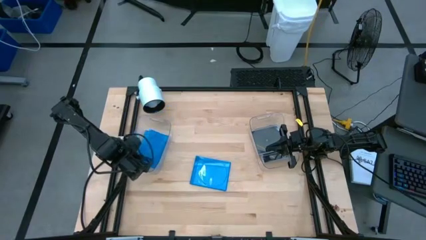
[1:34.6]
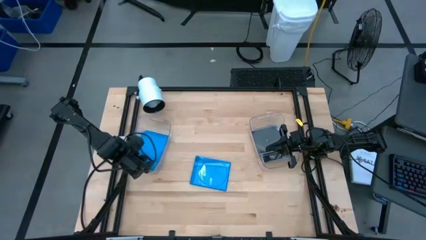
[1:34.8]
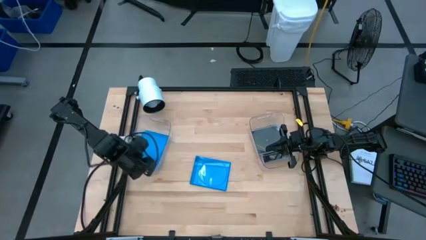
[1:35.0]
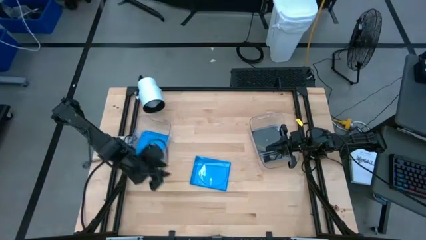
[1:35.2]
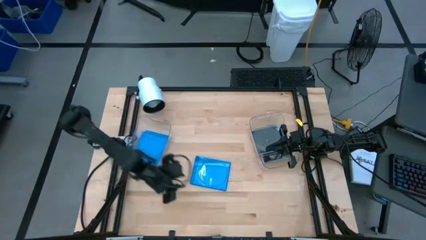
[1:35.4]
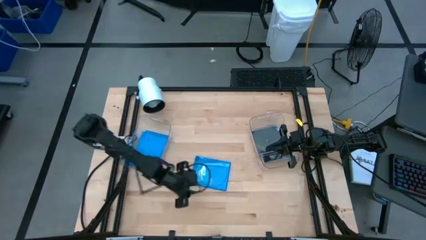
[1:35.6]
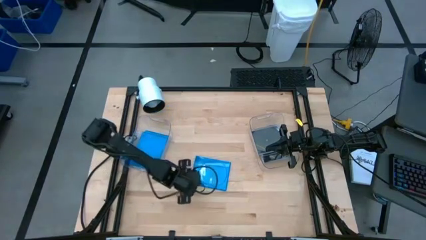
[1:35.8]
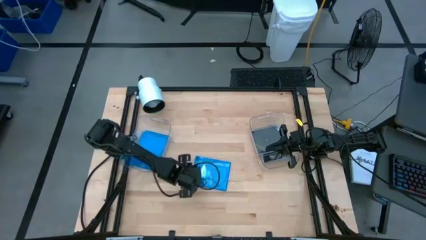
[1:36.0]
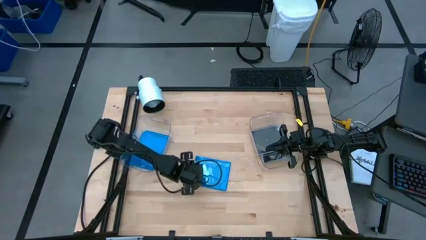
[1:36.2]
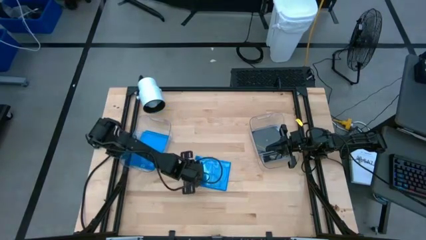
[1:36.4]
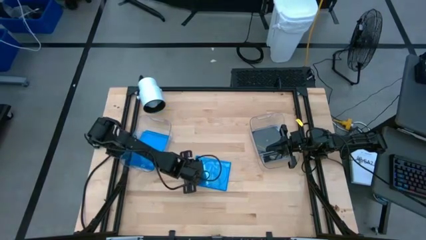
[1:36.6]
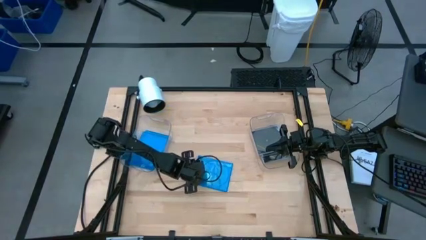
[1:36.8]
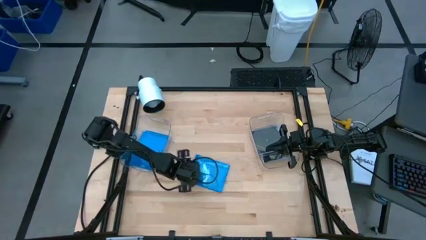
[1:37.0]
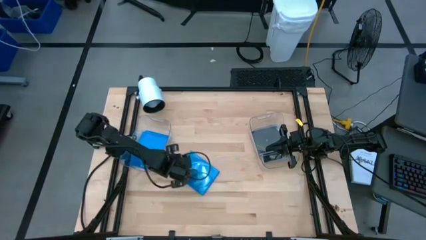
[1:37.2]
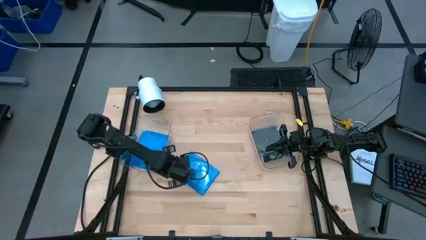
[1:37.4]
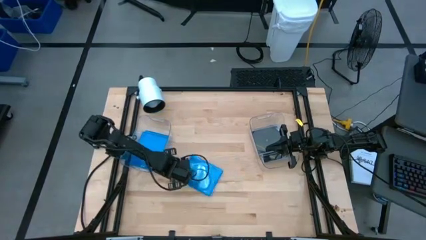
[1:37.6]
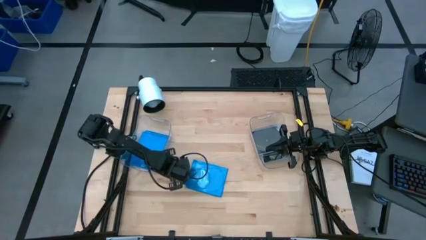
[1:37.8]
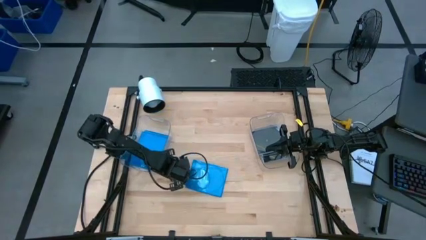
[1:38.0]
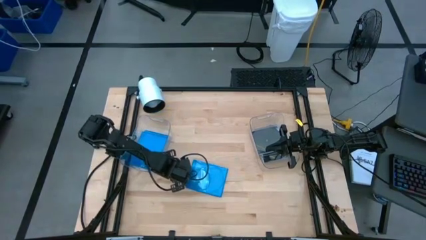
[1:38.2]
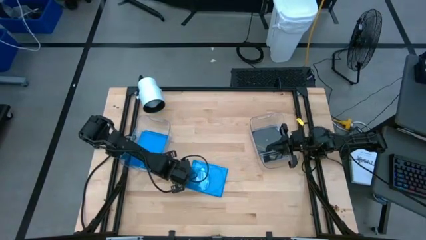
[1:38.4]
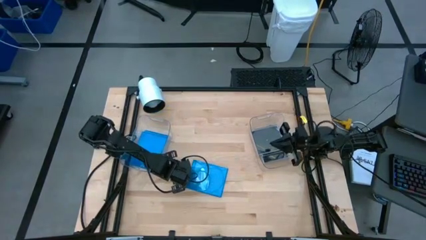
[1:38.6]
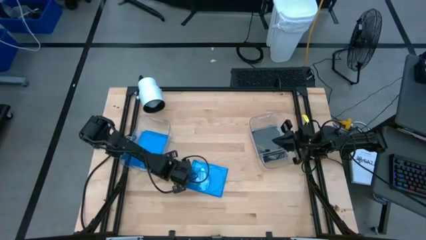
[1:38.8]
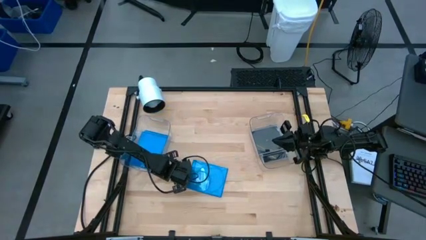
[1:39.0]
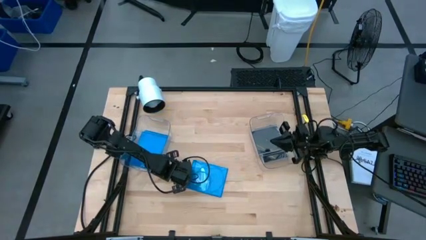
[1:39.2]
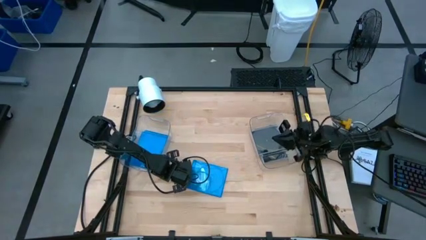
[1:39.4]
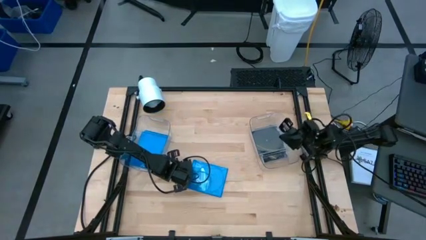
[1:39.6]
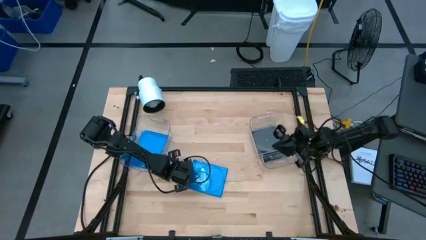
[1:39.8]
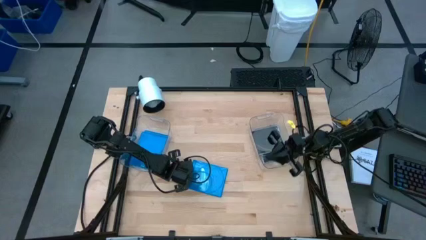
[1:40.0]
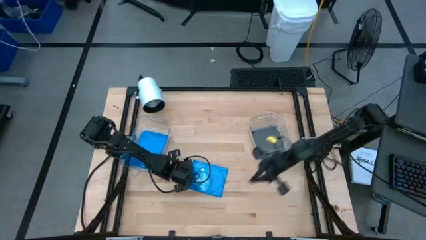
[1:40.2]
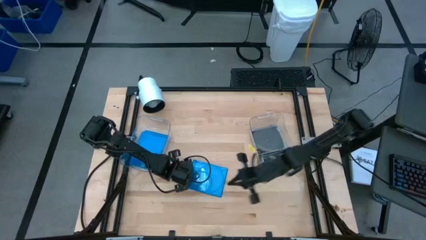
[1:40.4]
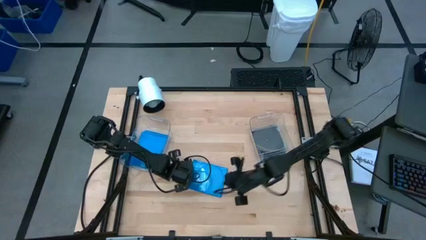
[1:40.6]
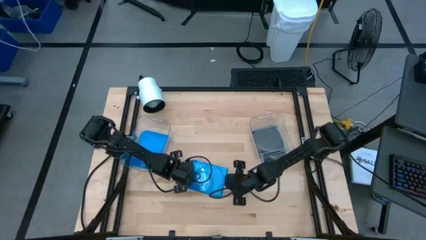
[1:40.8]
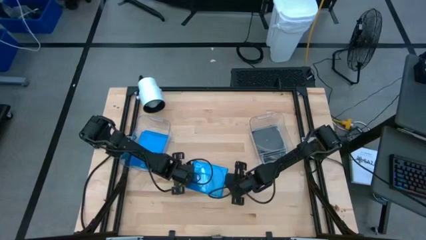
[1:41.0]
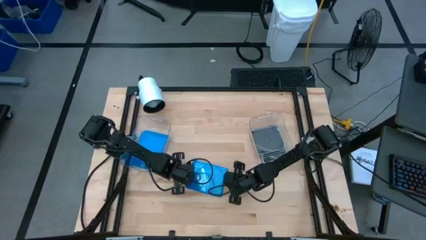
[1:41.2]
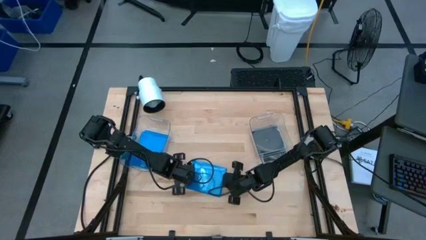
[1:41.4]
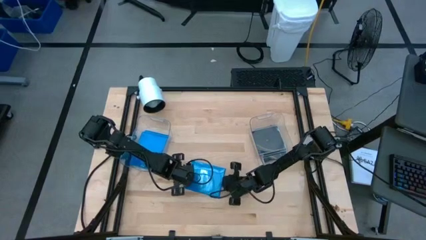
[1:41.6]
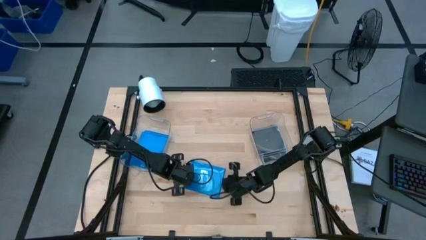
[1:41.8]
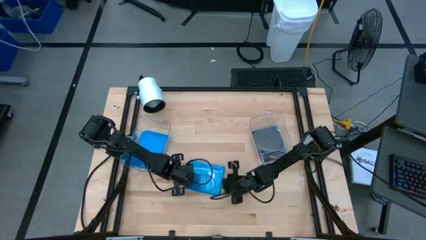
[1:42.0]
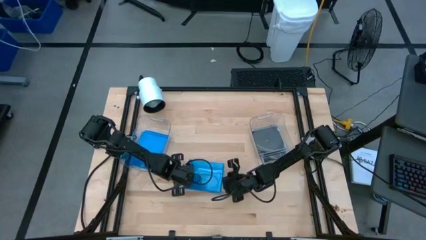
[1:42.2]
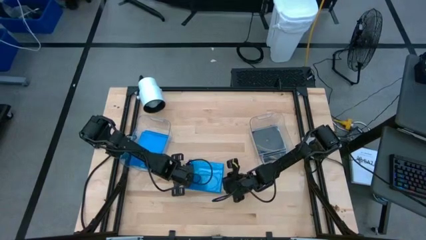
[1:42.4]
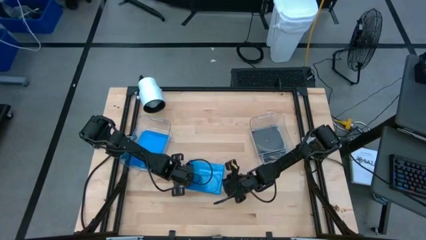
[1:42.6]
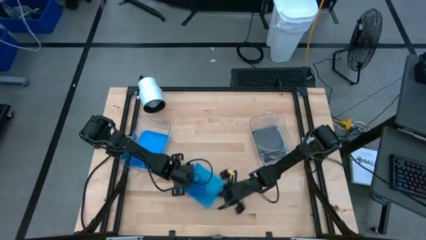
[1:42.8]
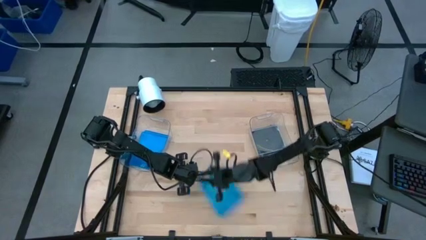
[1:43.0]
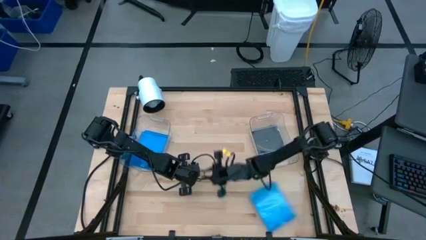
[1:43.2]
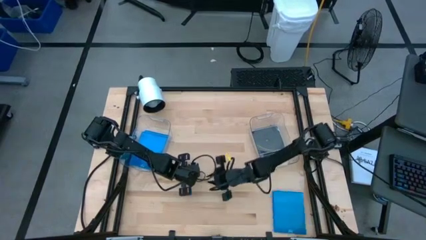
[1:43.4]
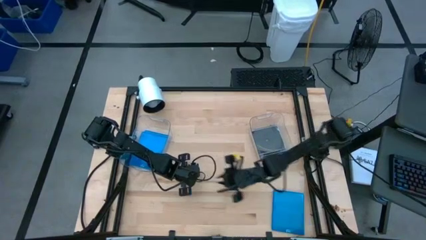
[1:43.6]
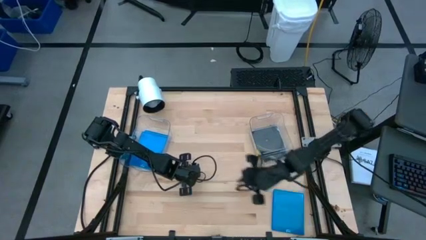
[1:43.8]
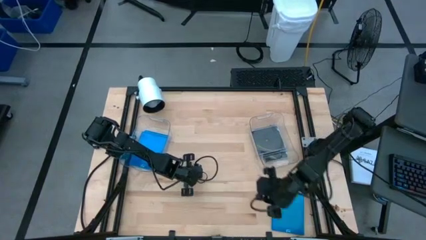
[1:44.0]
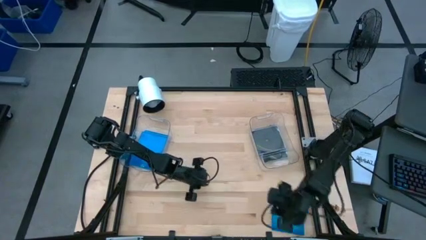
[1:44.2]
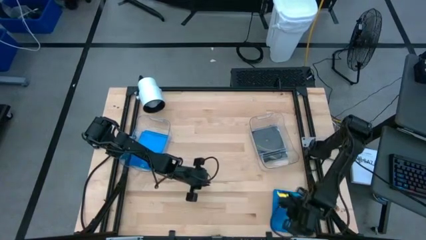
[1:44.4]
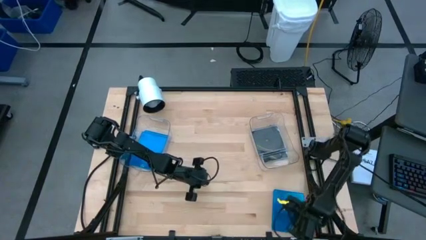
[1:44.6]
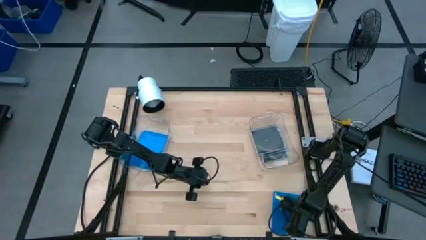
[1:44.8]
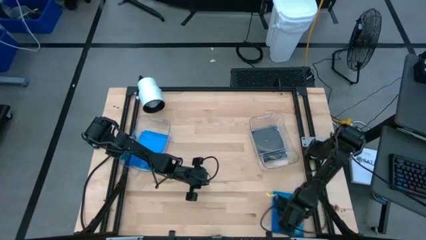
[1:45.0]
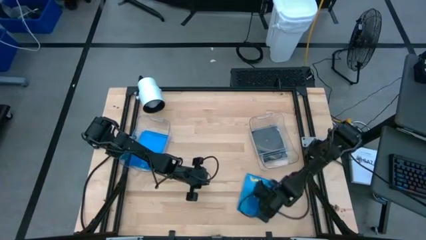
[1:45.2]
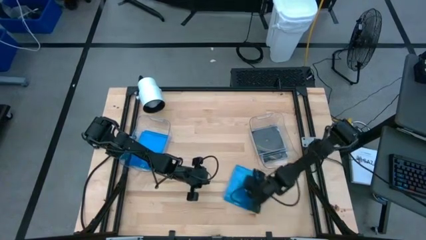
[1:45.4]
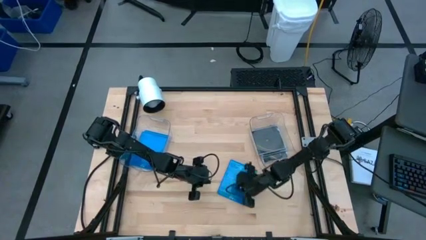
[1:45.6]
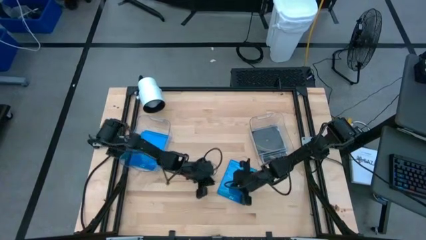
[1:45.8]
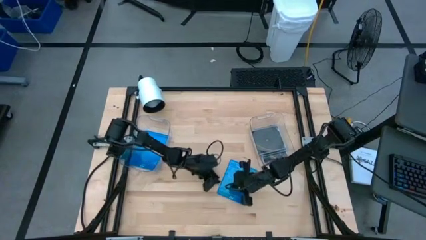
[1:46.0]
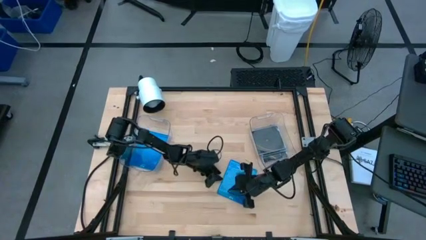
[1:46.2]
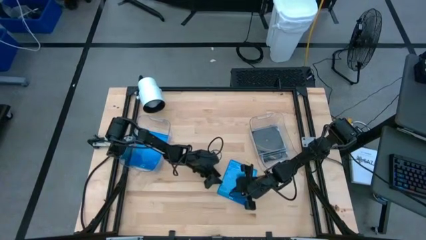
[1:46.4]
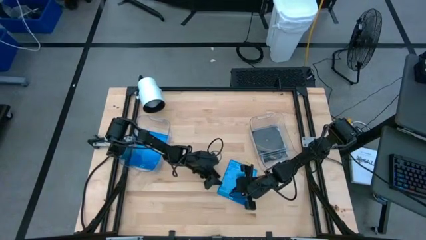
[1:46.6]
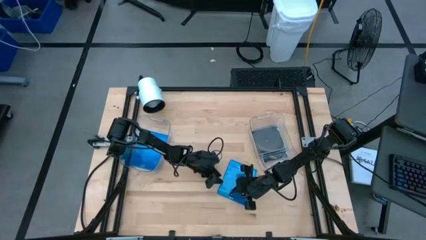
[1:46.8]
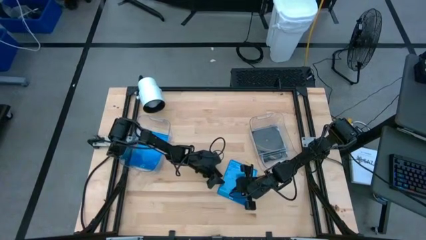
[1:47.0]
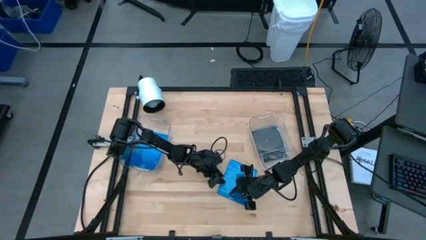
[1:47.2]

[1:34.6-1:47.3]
Task: Pick & place jewel cases by type
Put the blue CD case into the left transparent bin
